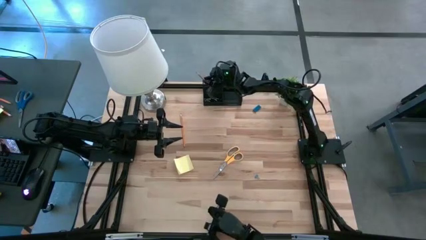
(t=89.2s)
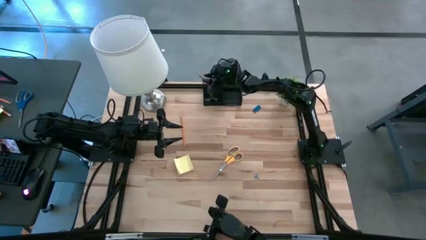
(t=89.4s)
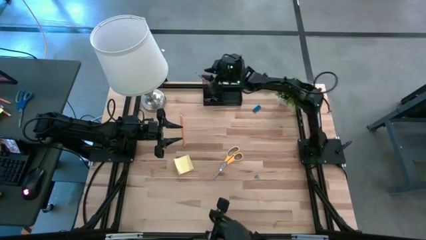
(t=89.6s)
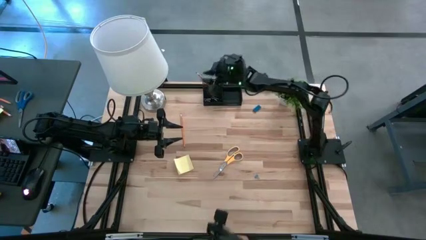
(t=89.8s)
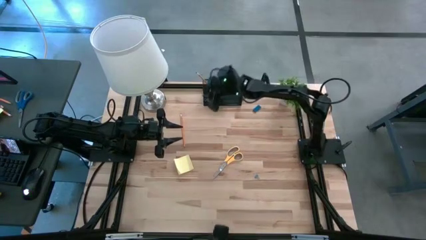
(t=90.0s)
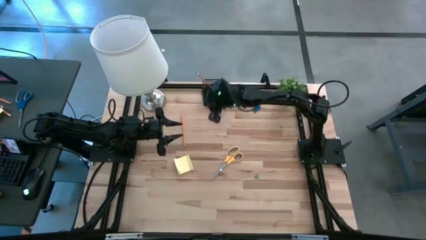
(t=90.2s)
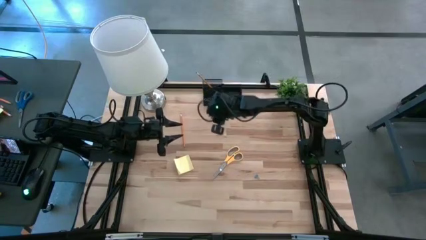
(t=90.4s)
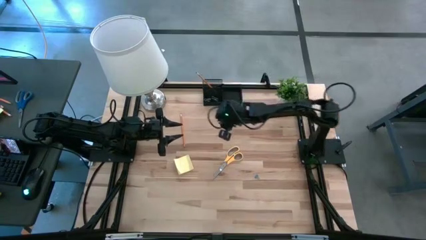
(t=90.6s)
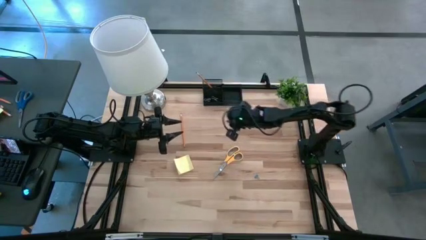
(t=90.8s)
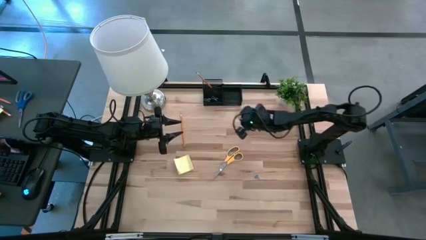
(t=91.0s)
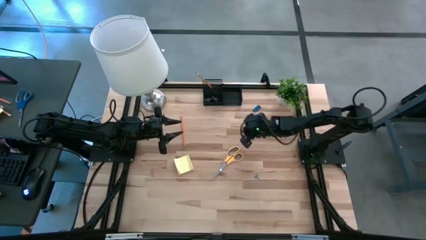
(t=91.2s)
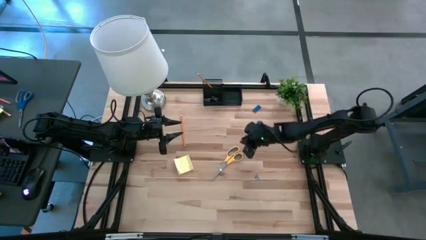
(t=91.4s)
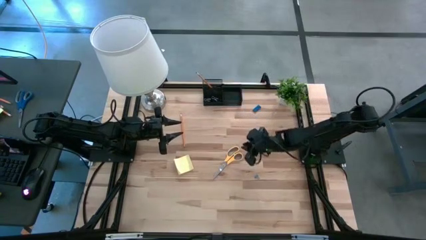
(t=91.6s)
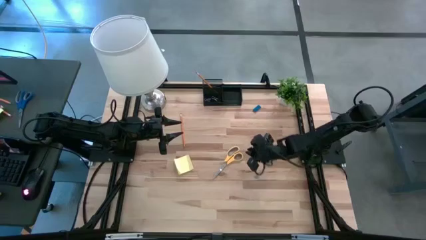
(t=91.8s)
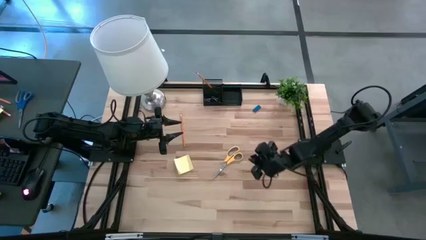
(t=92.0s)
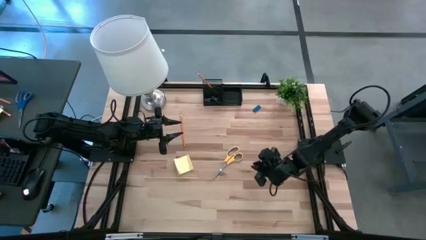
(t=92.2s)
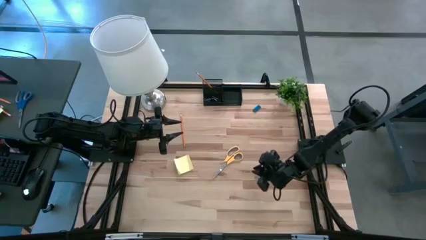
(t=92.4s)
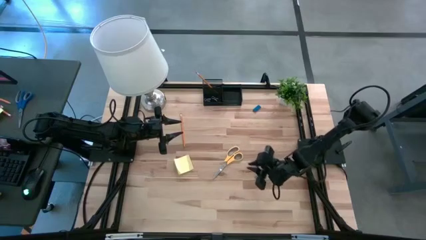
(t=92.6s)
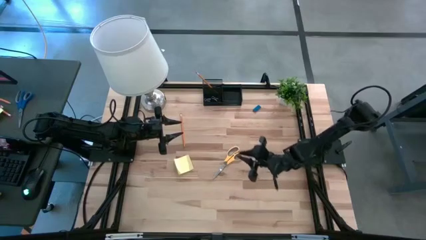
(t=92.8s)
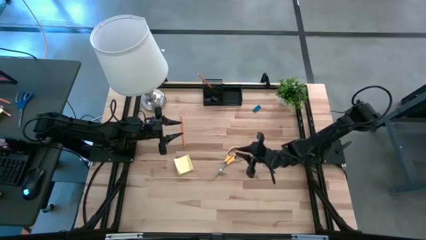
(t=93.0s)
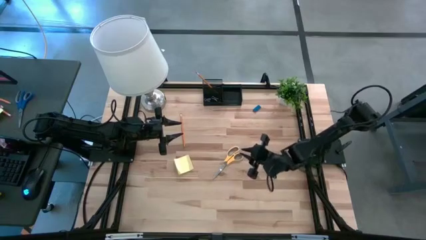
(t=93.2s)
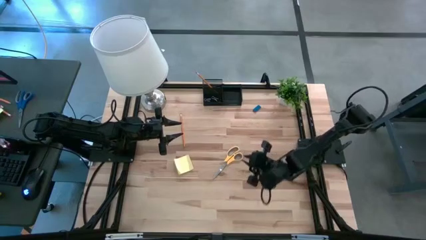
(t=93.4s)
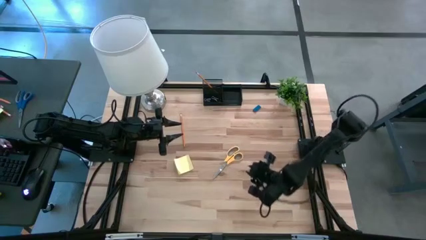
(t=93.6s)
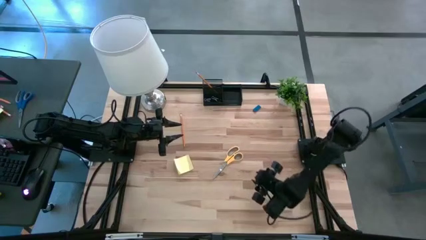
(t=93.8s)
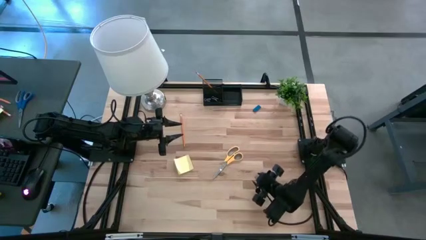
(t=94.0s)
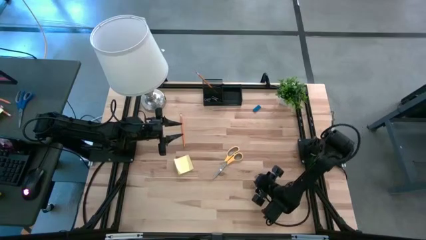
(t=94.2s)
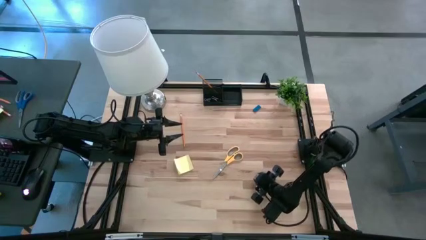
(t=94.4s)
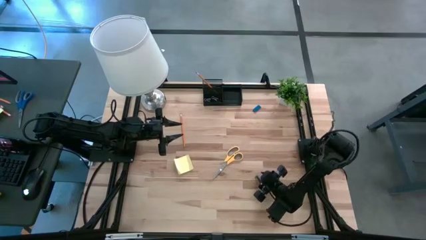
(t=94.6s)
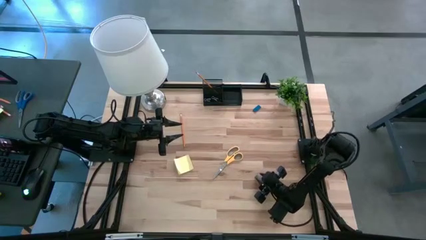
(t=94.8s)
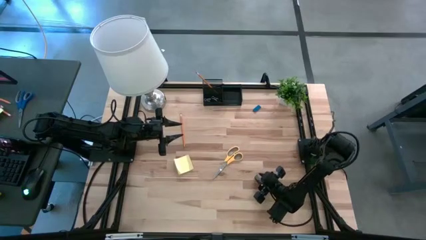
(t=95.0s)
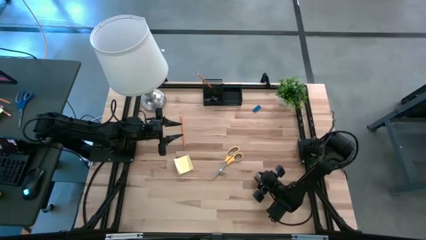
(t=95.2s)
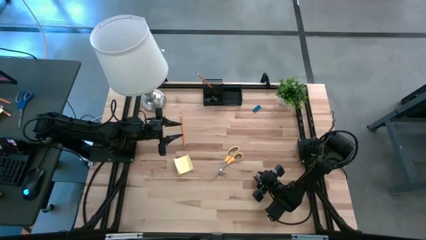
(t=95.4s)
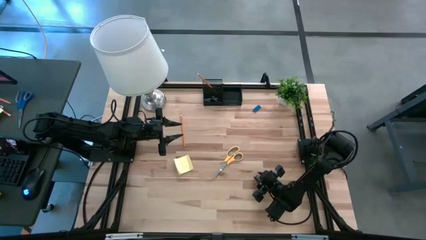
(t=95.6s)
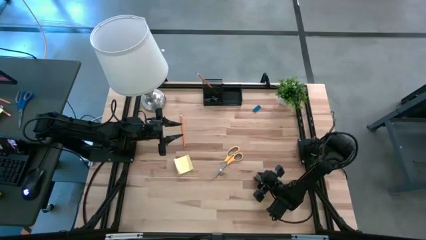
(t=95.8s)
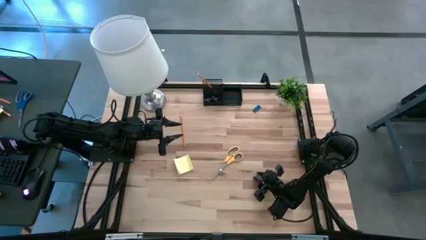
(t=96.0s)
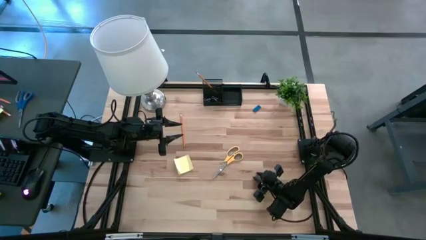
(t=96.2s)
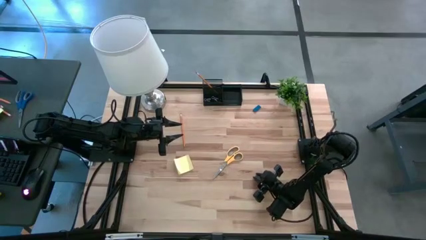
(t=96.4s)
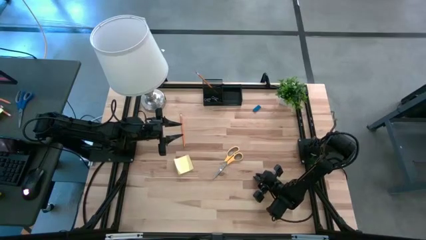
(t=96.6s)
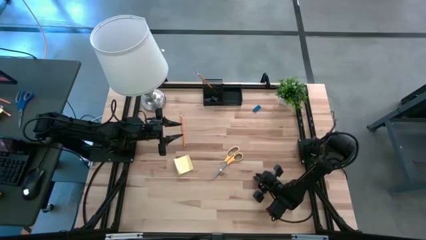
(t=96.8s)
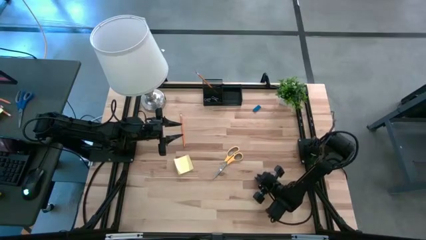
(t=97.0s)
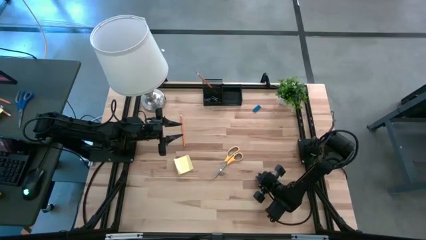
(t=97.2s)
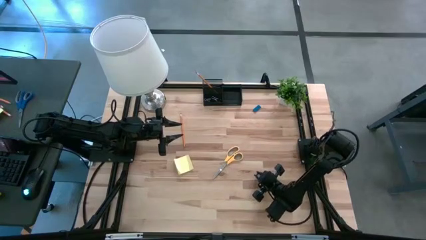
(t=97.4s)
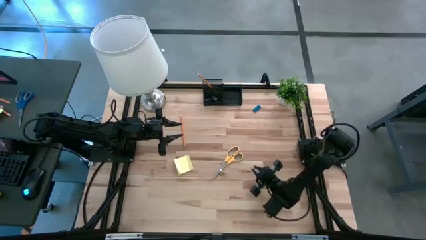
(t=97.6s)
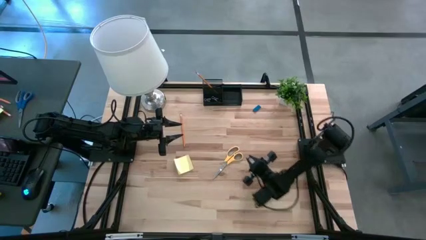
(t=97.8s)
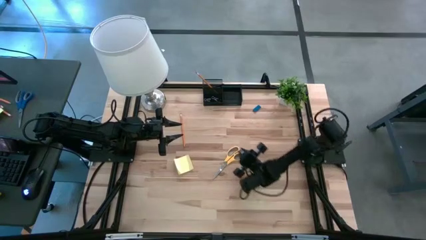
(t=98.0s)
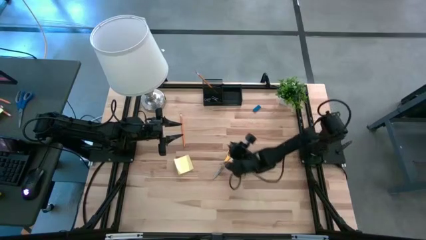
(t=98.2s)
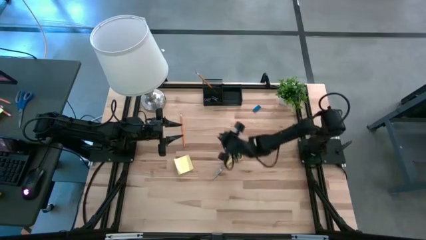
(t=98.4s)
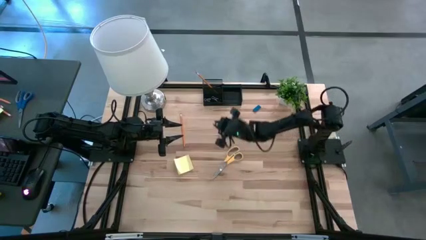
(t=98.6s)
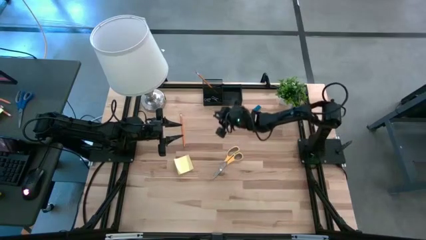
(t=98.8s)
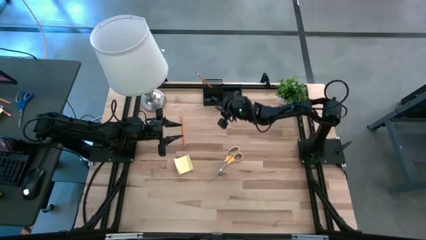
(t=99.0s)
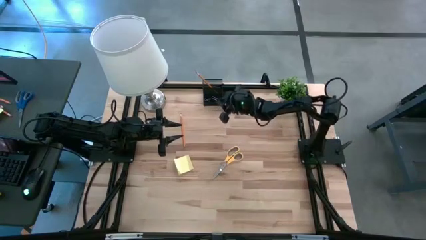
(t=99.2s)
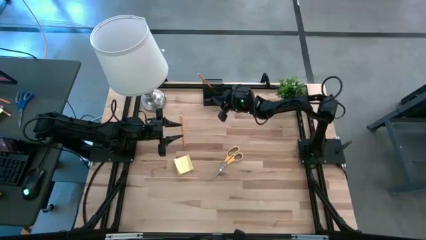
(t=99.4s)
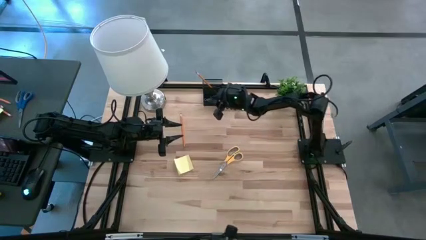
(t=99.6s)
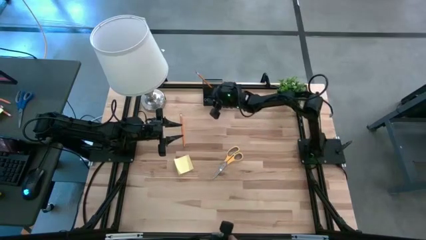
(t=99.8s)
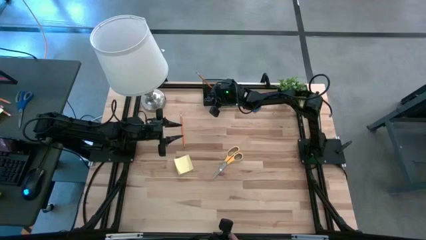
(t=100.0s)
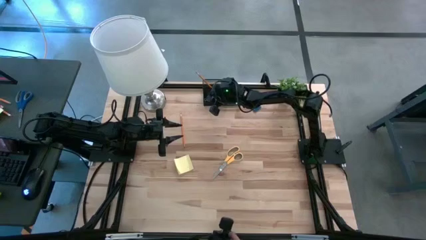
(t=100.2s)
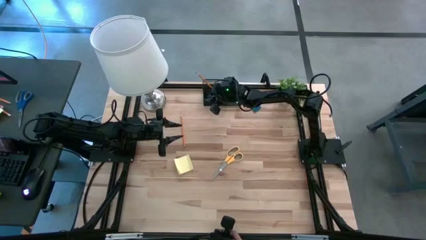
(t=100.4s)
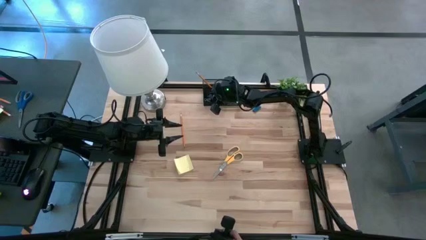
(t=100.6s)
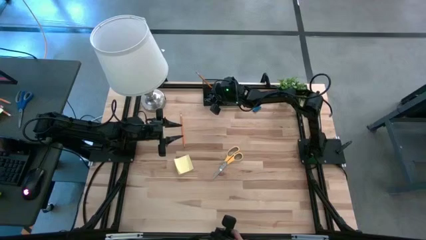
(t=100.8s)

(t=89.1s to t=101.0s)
Task: Pick and place office supplies into organizer
Put the blue binder clip into the desk organizer
